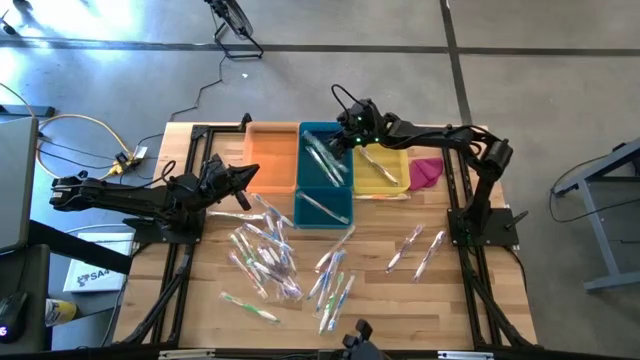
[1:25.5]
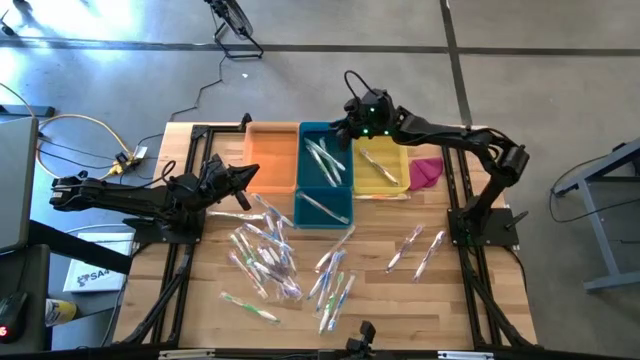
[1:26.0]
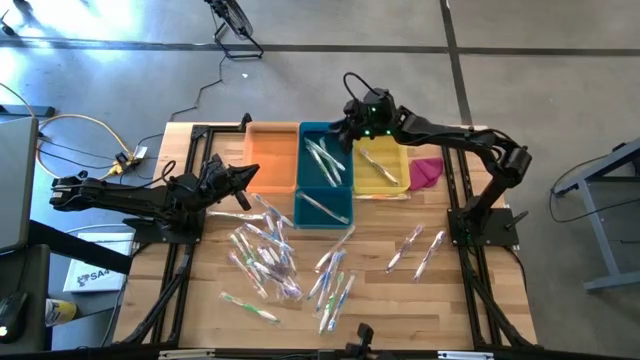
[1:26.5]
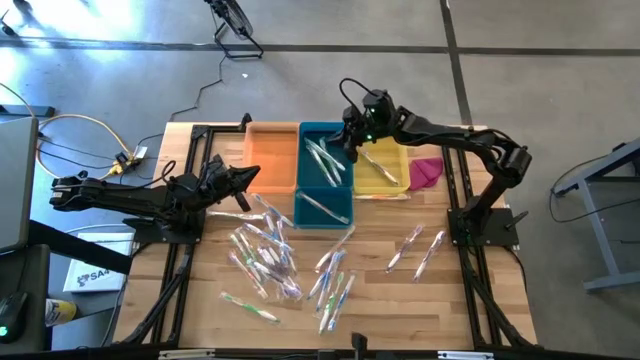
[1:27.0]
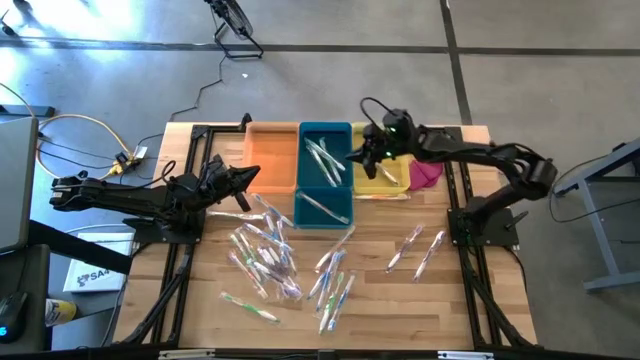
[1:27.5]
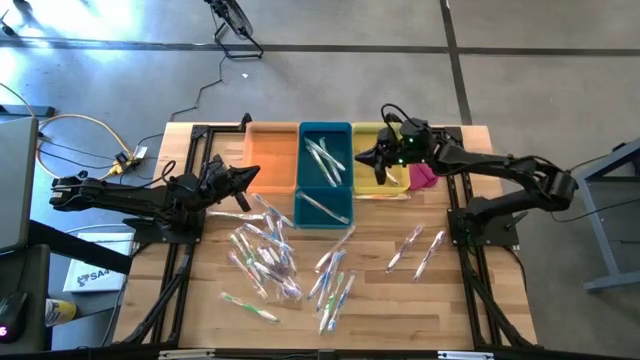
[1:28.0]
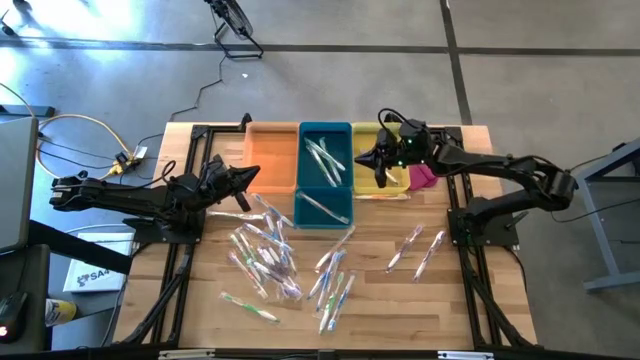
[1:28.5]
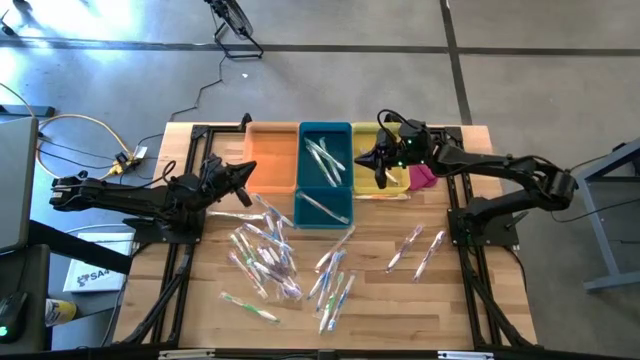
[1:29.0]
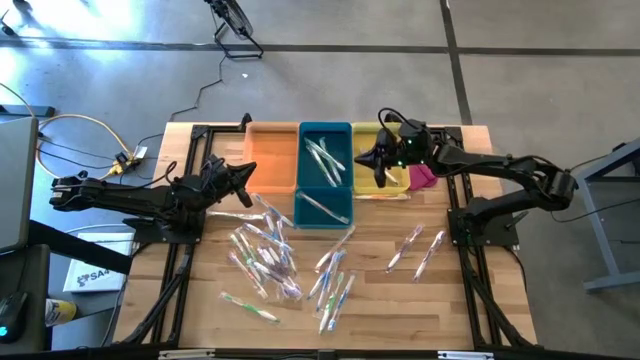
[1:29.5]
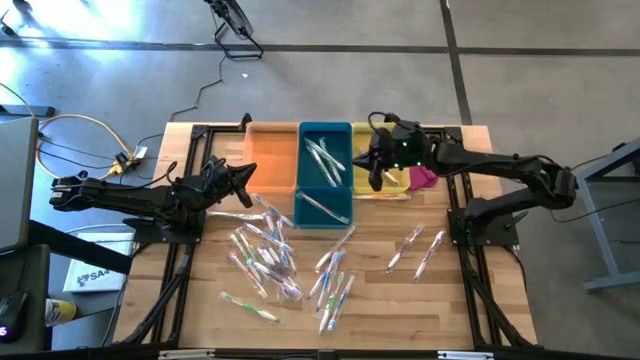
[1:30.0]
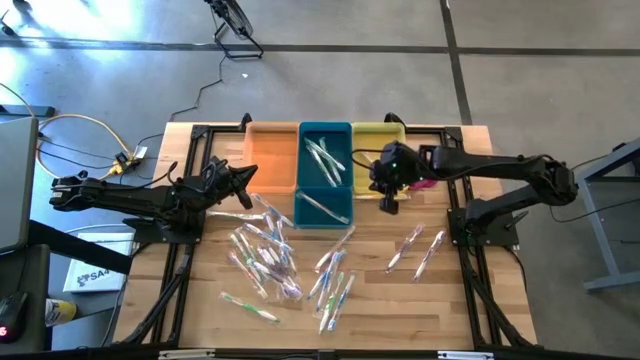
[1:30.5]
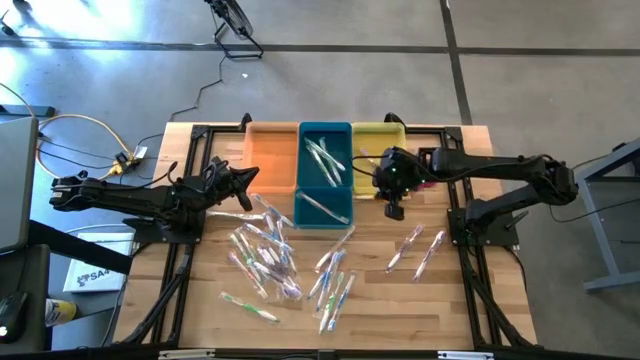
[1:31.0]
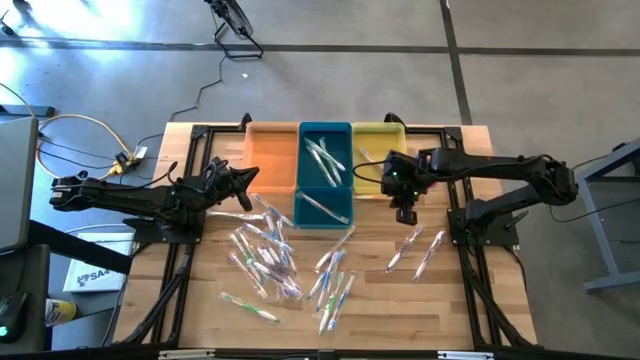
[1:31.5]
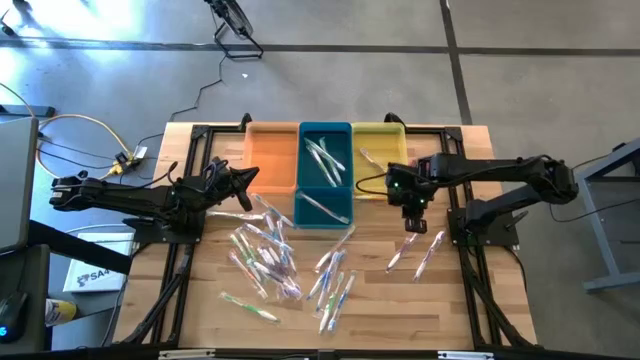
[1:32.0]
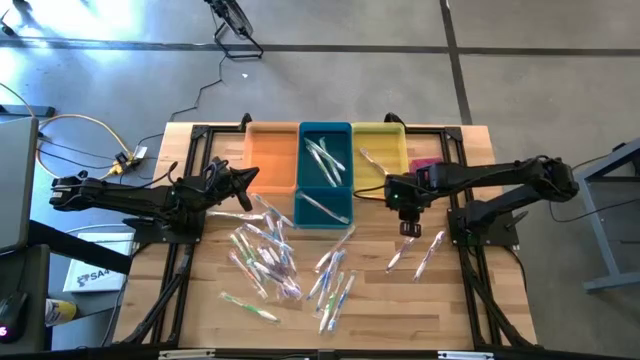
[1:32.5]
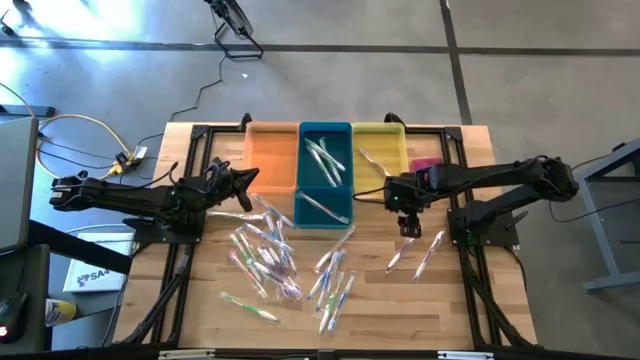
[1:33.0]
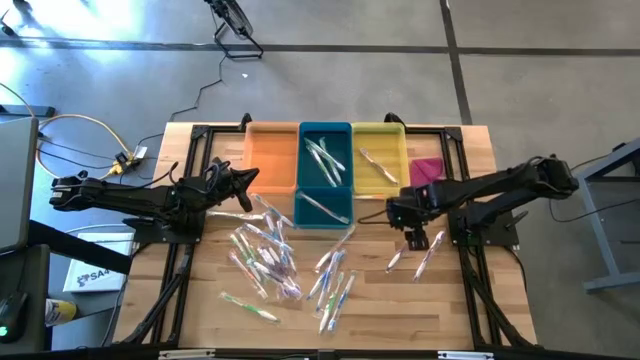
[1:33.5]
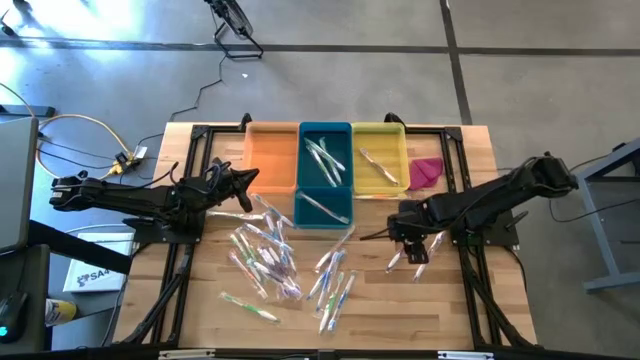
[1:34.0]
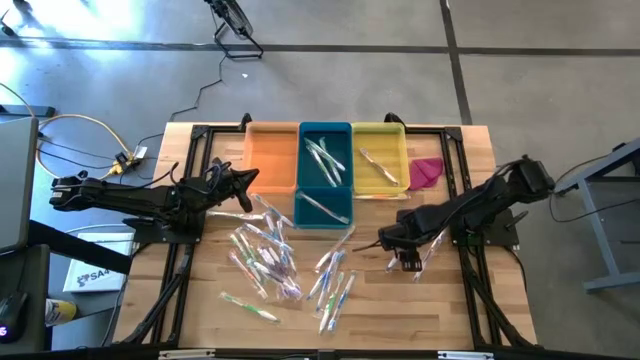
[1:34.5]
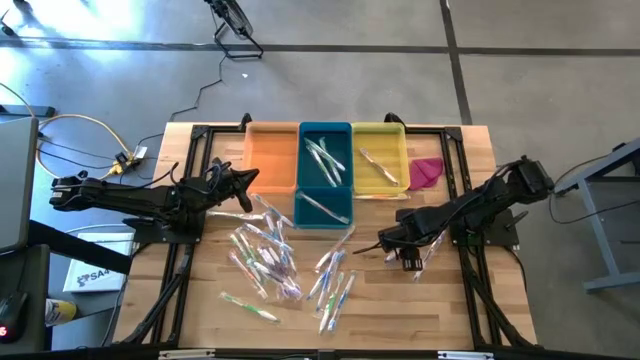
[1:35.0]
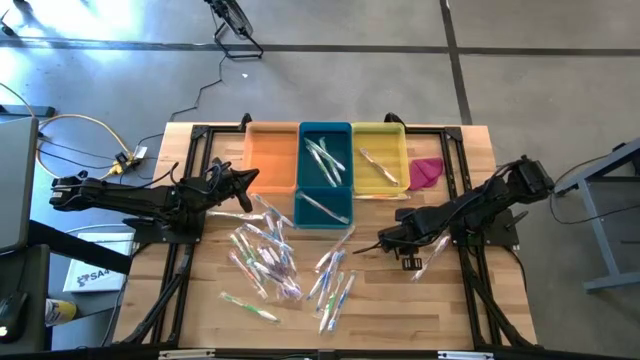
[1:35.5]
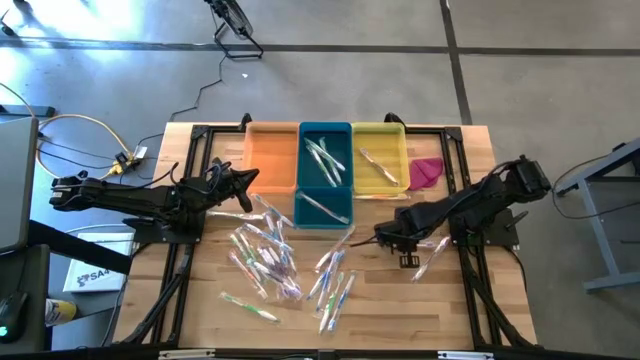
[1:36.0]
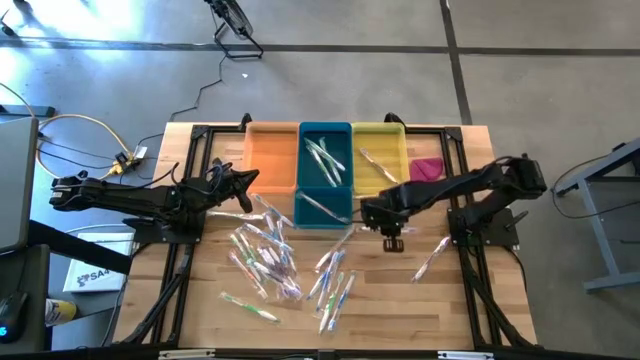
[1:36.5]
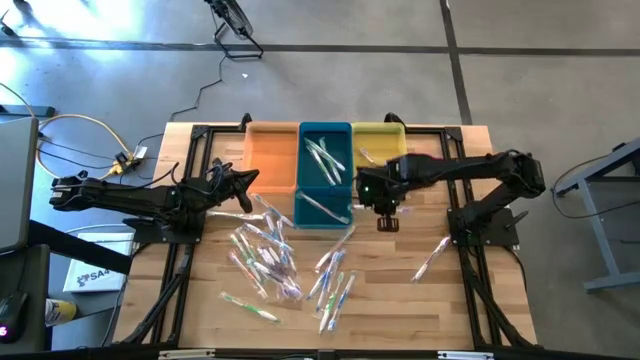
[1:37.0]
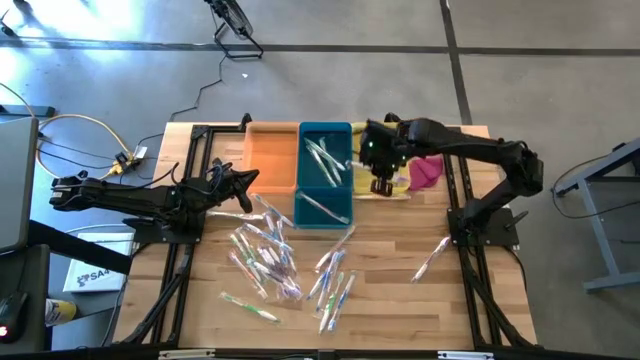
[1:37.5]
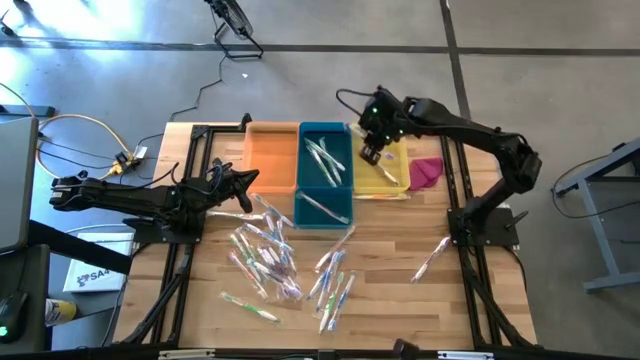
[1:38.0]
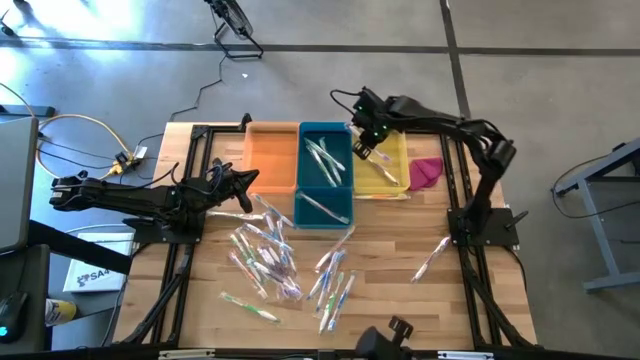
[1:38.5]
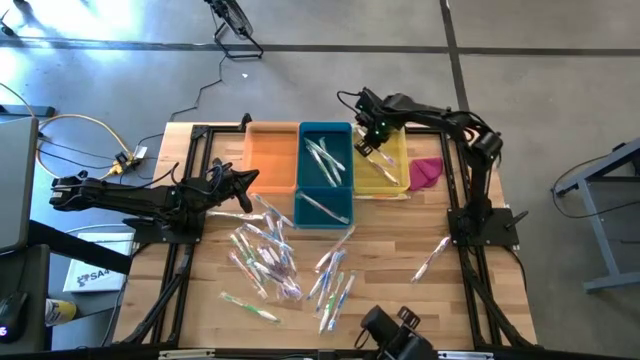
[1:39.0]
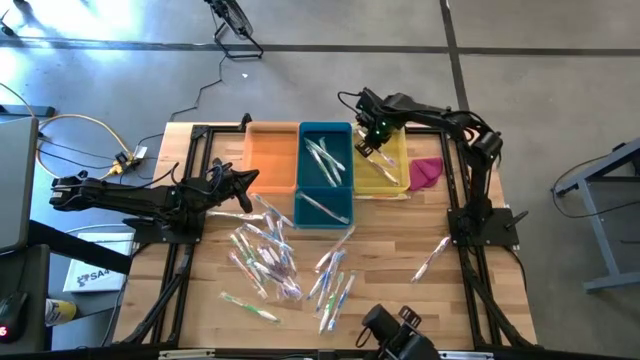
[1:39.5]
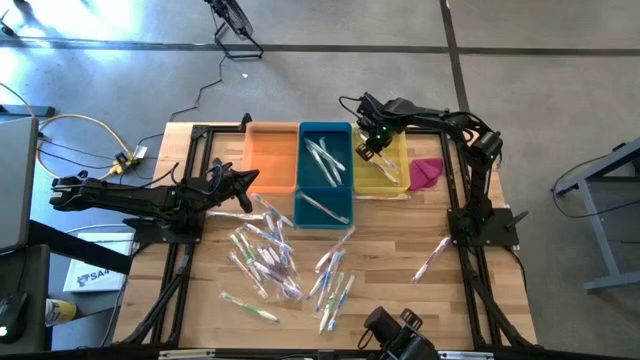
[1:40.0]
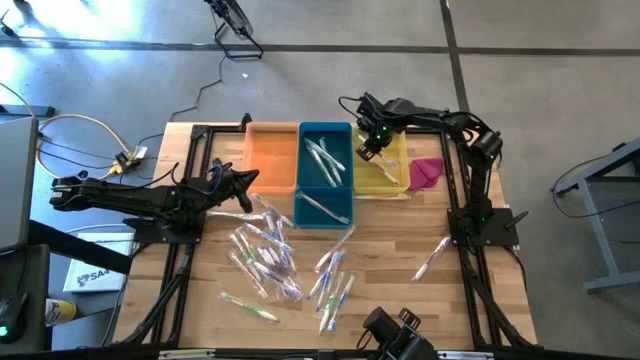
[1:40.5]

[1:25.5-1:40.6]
Task: Pick & Place Toothbrushes
Put the violet toothbrush into the yellow bin

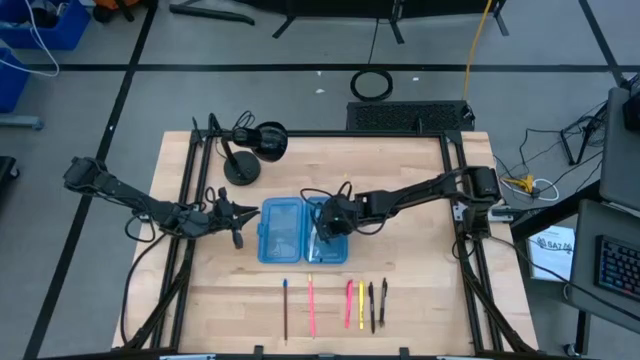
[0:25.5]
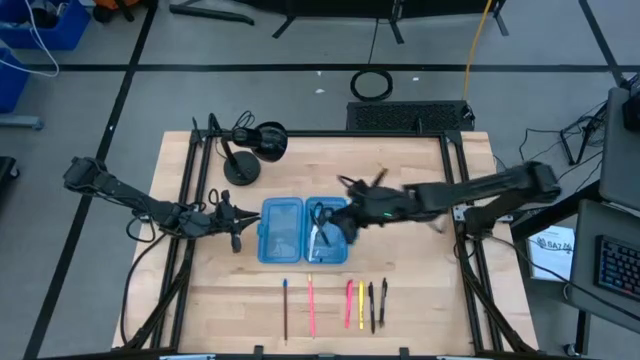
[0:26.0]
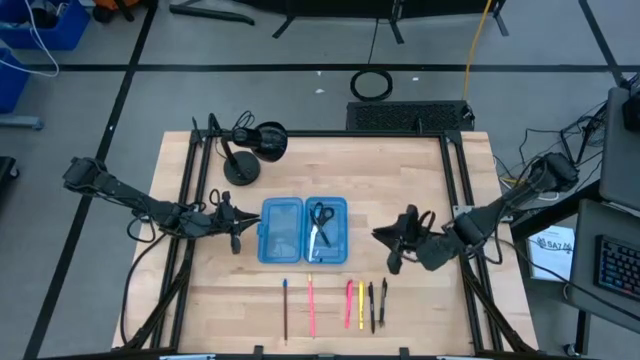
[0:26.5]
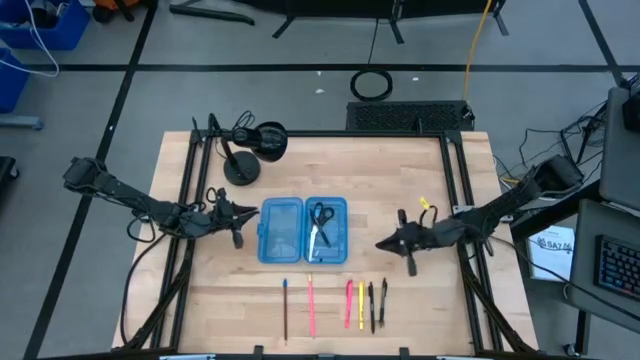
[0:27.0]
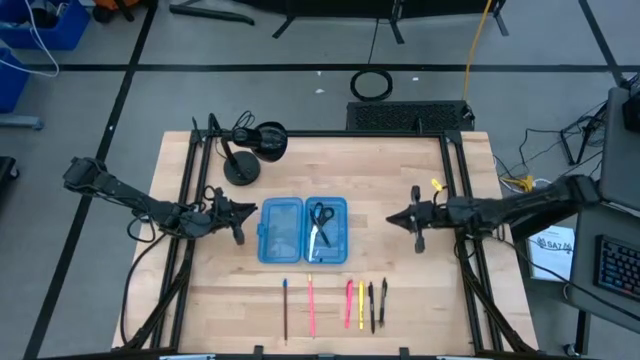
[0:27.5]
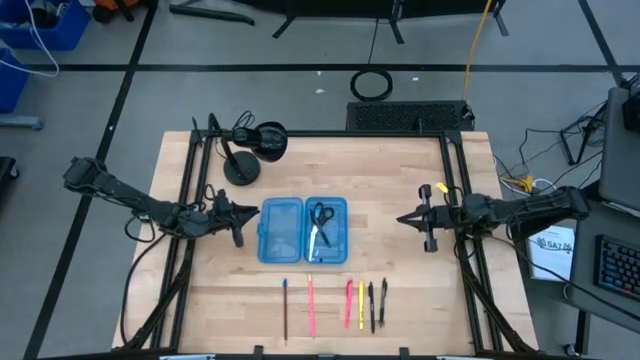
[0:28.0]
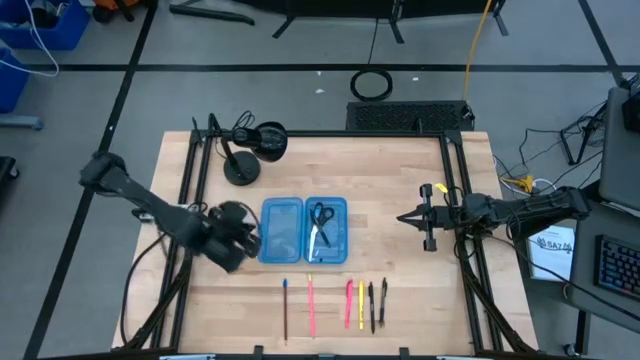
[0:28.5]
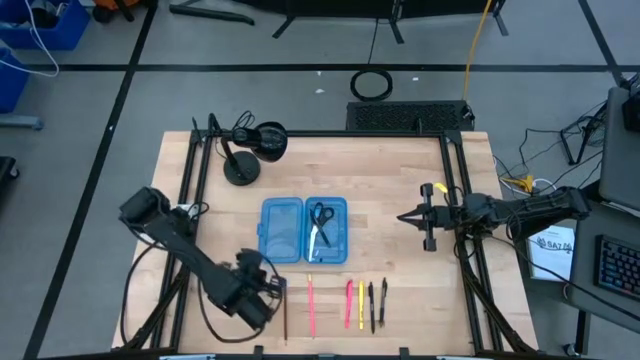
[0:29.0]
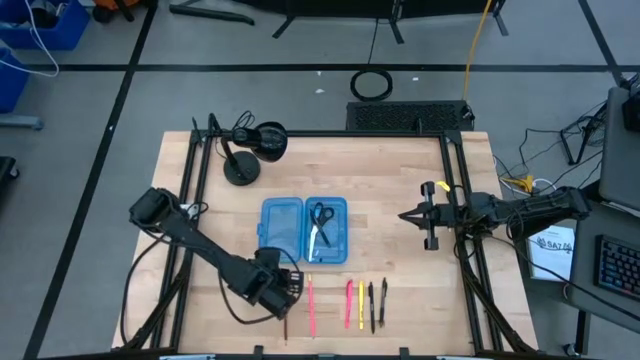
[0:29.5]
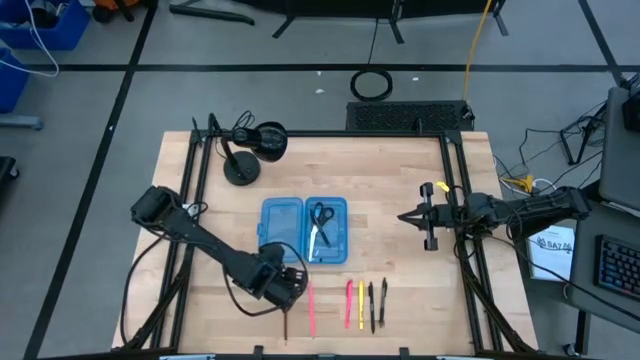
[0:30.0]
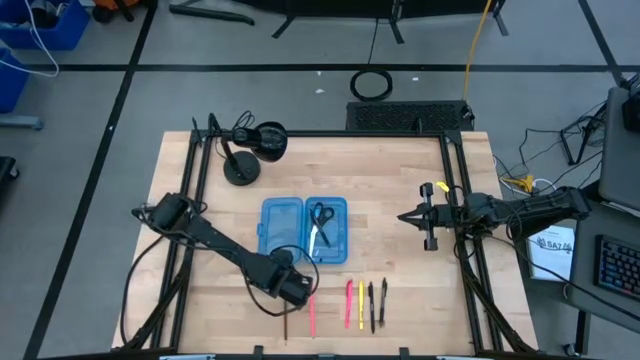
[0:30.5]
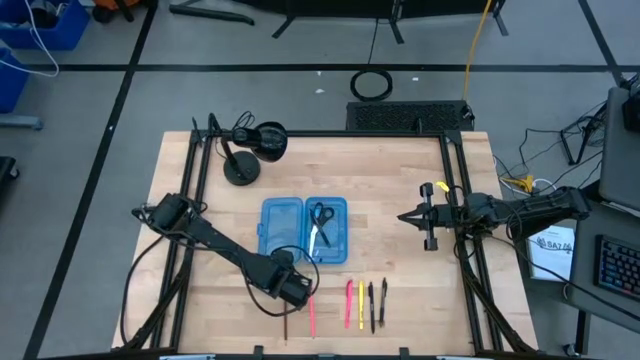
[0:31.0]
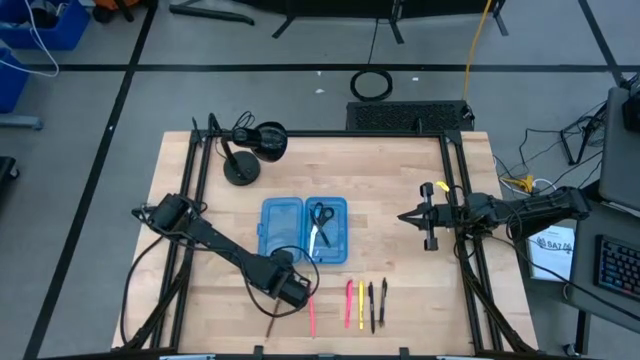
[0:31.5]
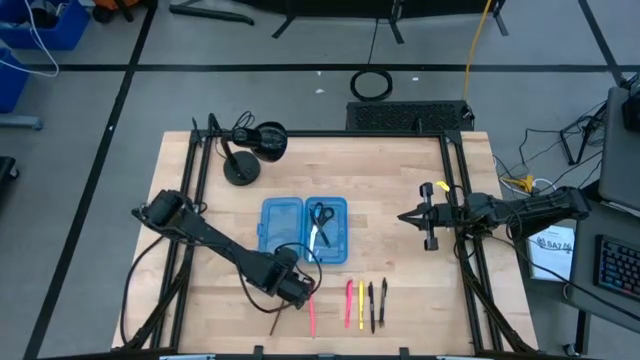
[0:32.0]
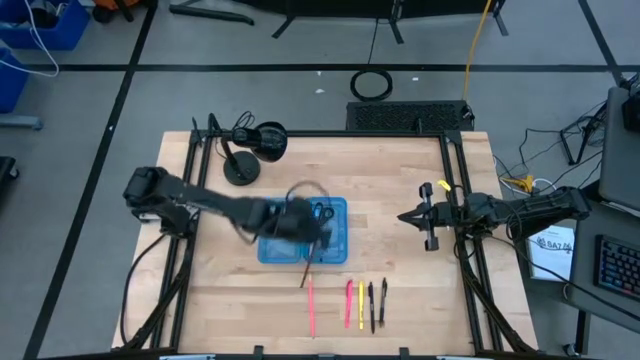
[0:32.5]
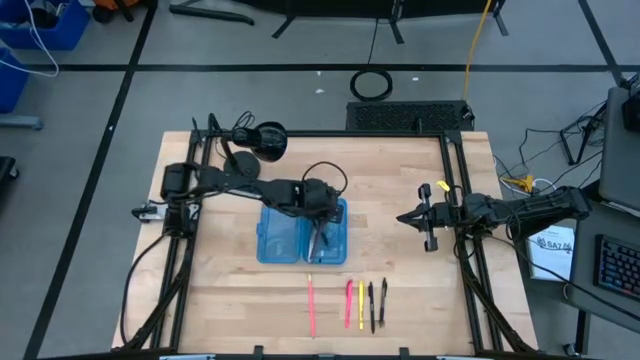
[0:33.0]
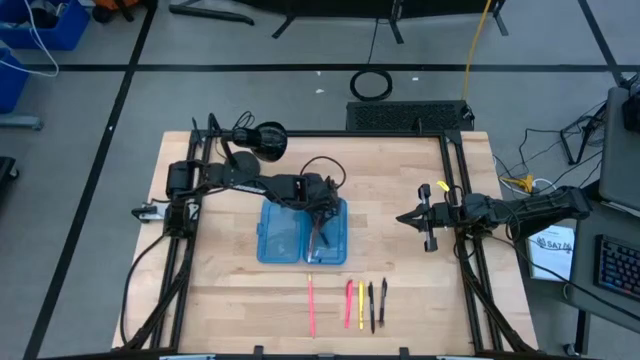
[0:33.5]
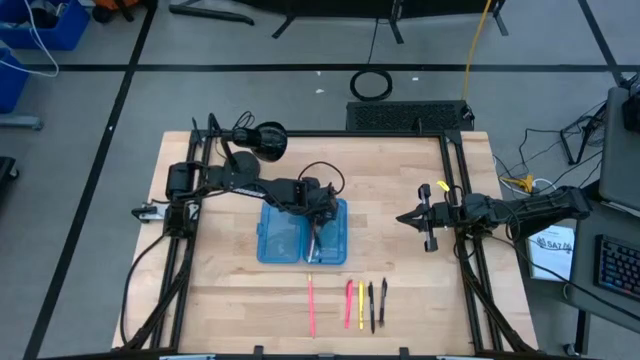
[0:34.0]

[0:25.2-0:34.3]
Task: Pick & place school supplies into a supply box
Put the brown pencil into the blue box
